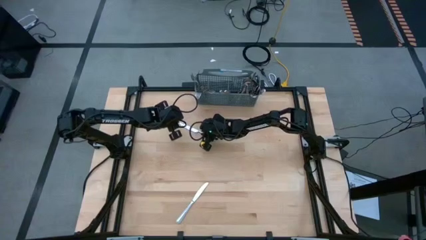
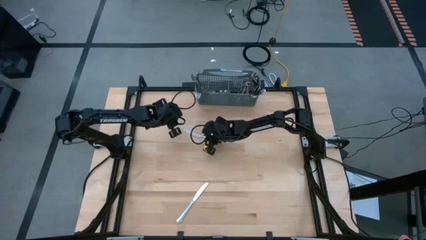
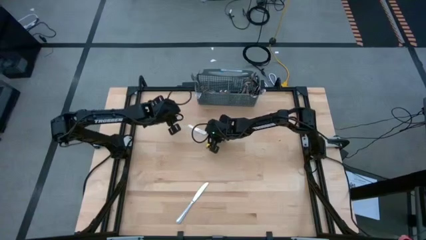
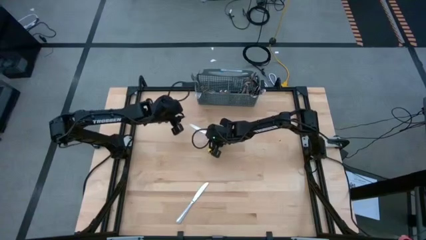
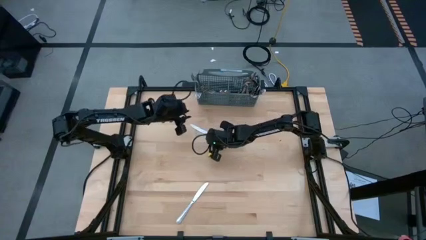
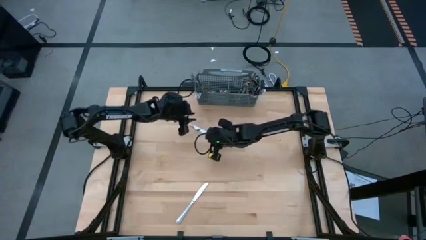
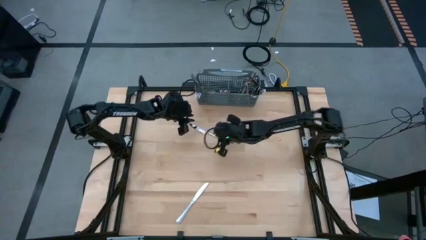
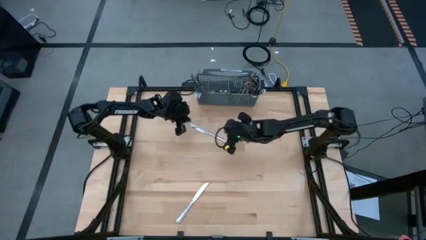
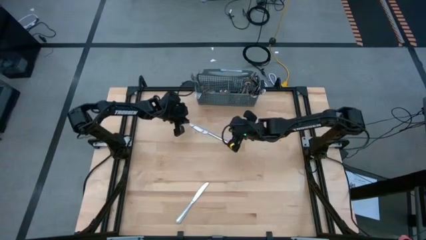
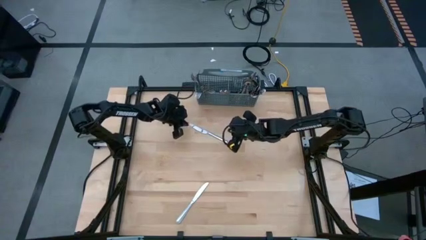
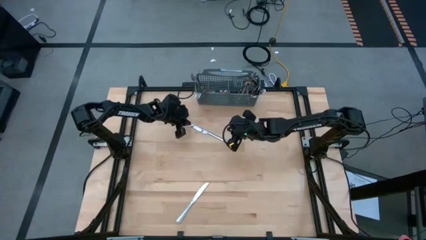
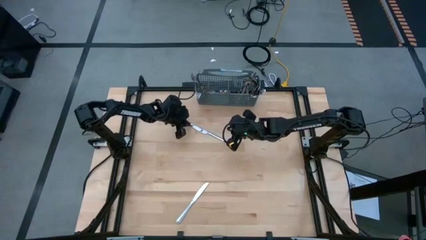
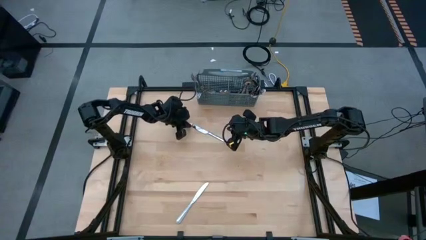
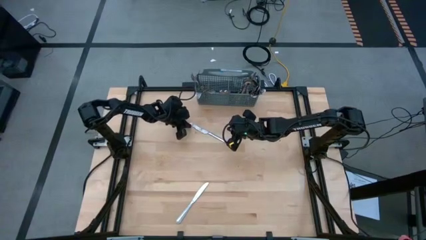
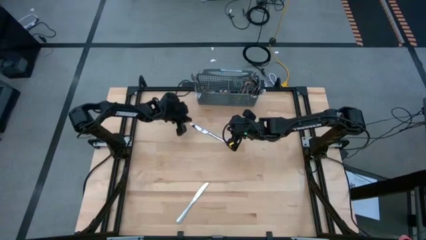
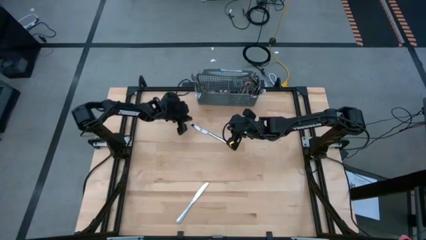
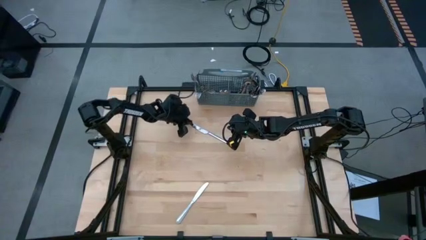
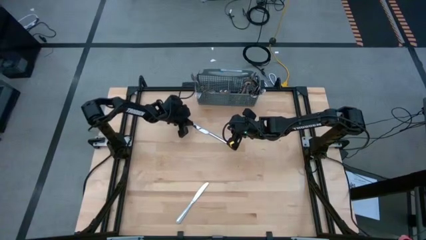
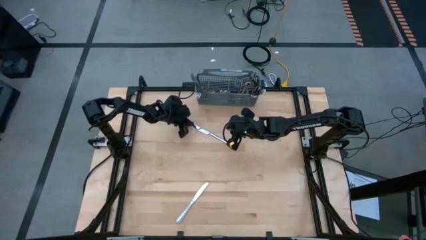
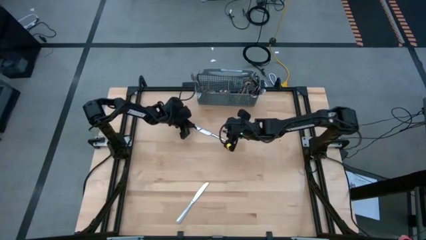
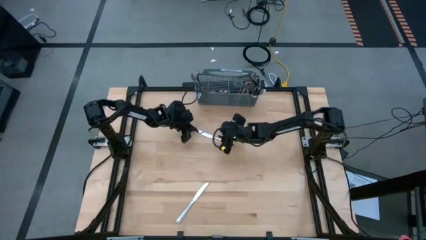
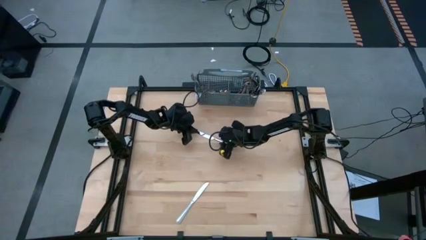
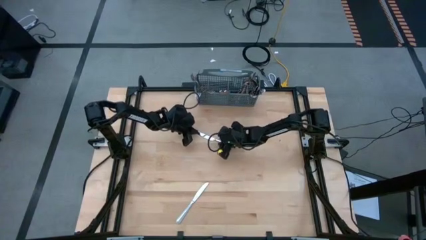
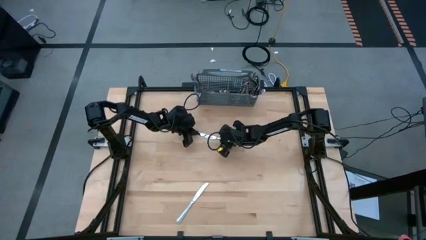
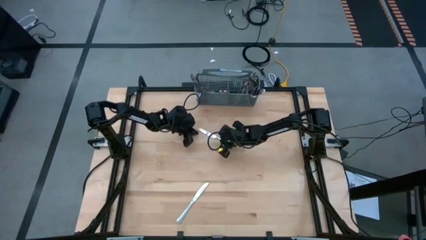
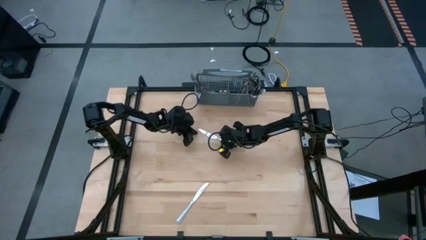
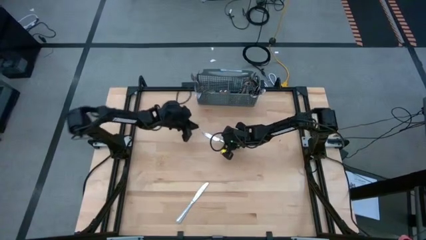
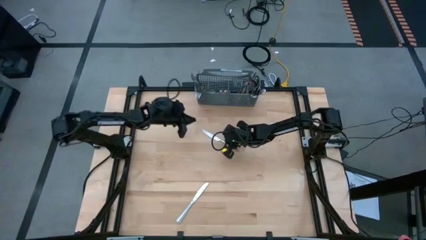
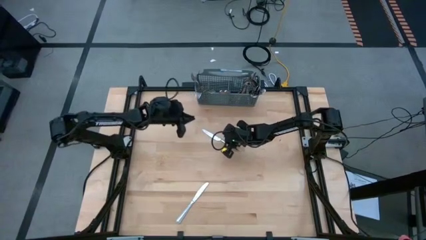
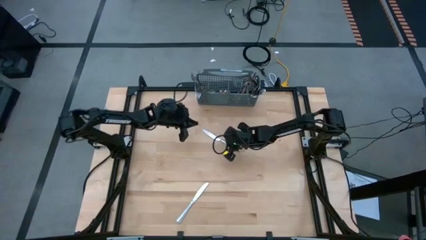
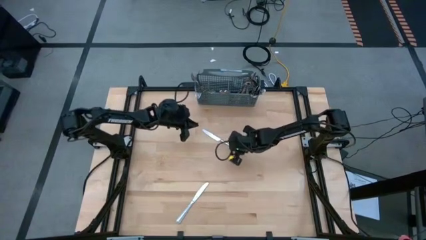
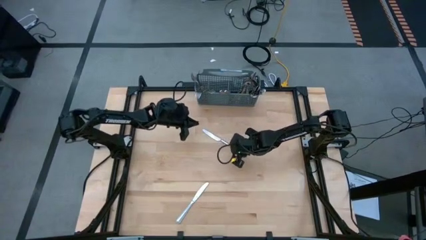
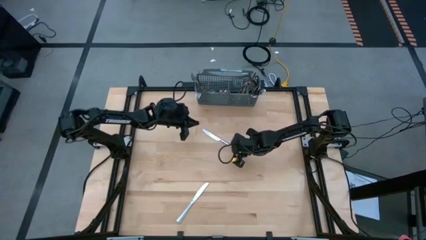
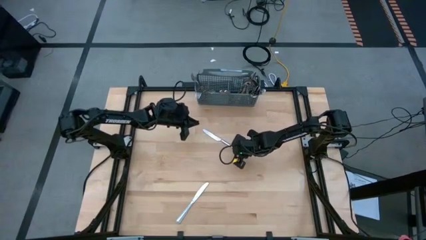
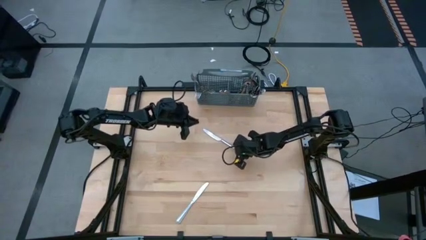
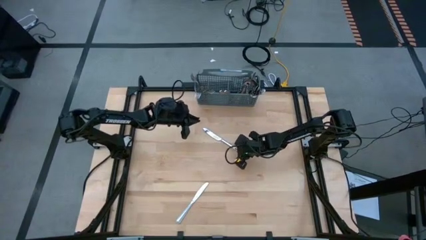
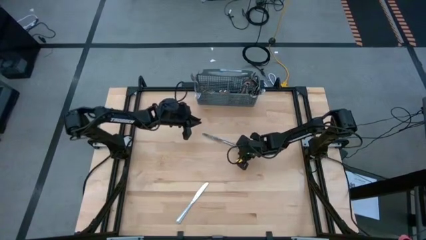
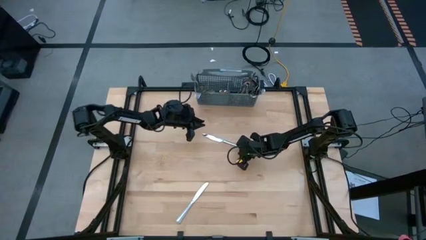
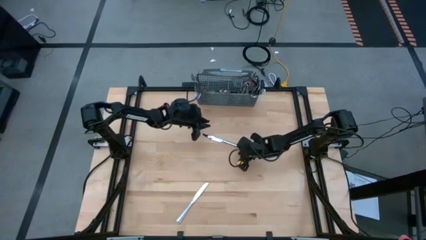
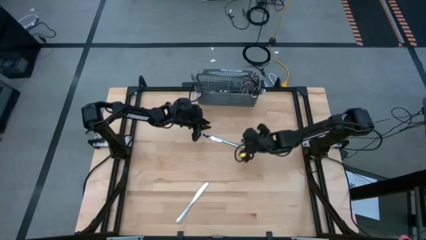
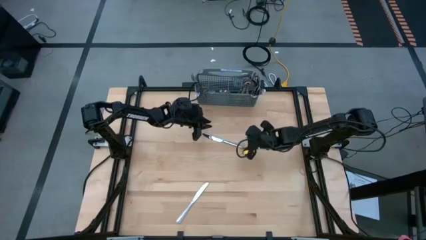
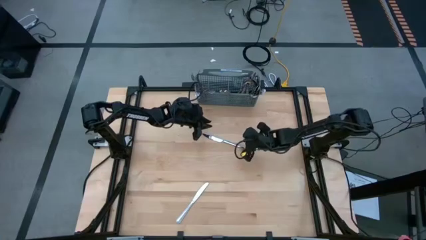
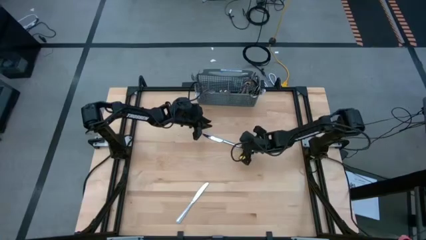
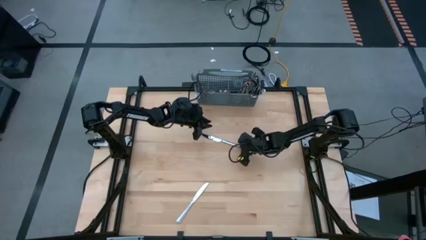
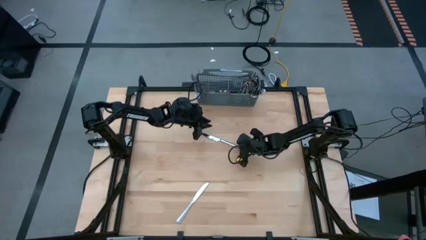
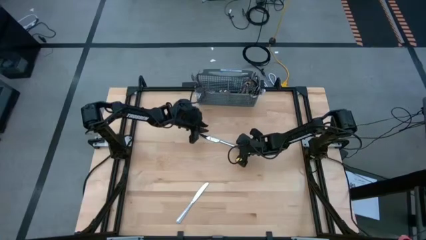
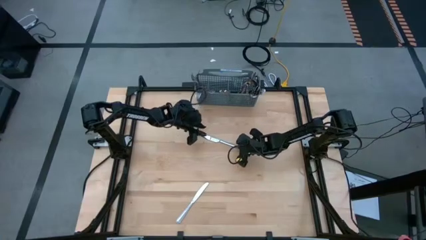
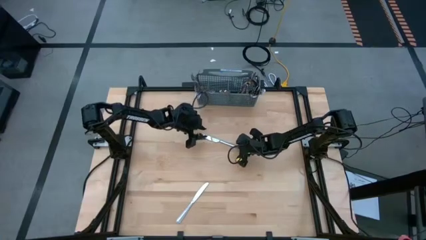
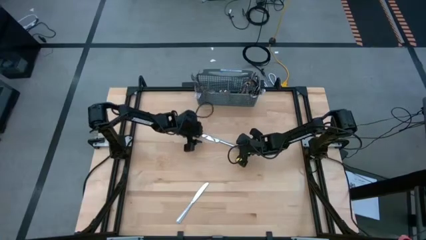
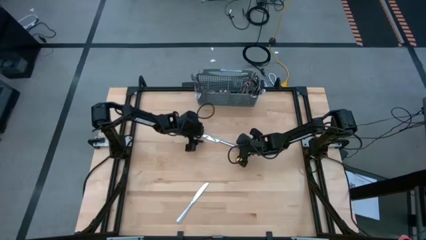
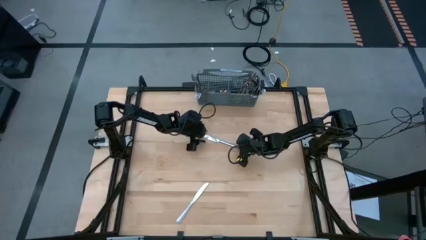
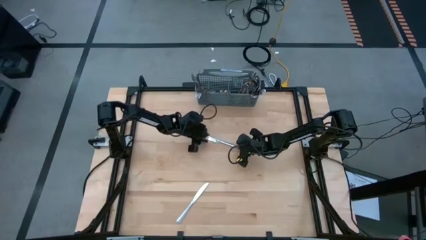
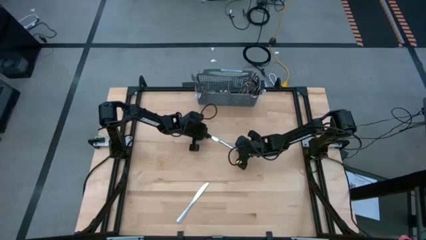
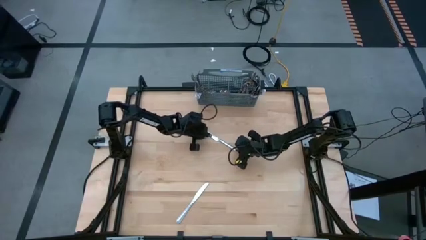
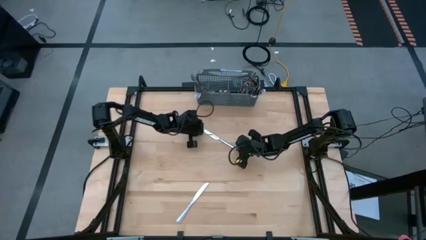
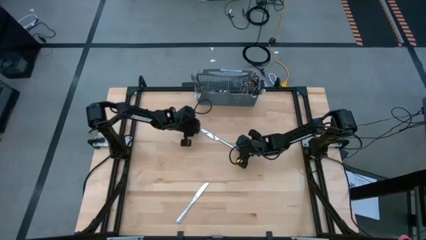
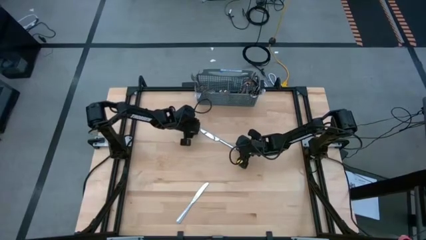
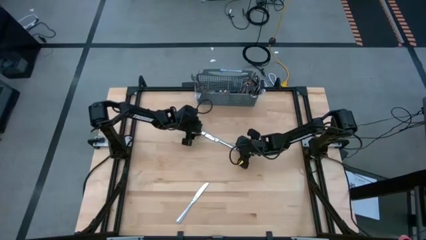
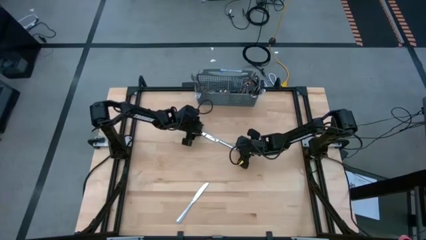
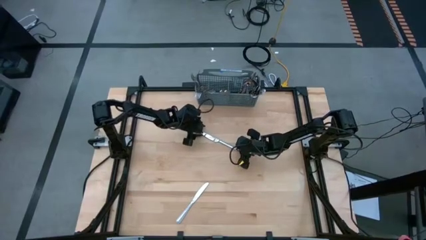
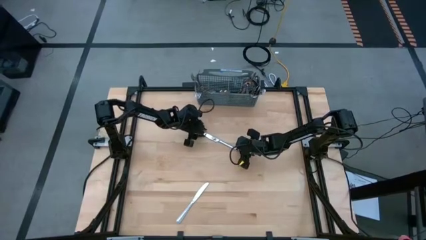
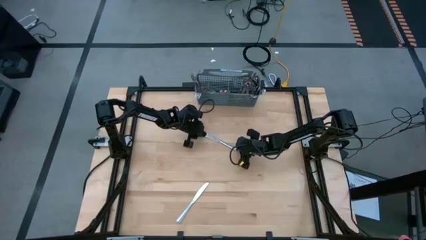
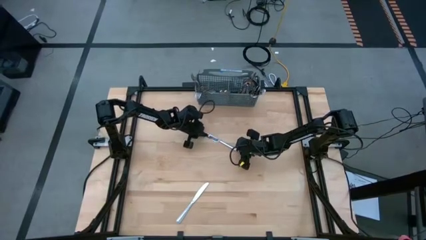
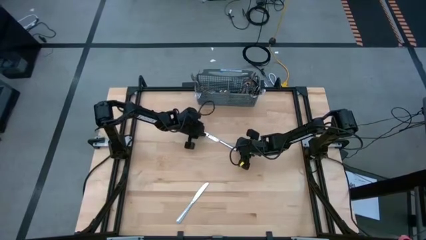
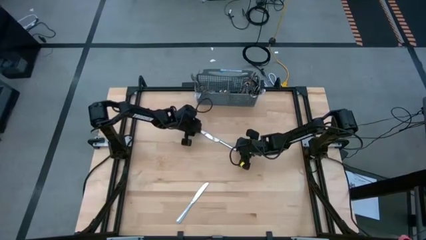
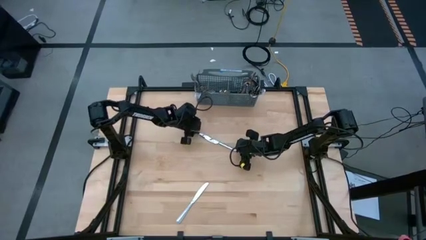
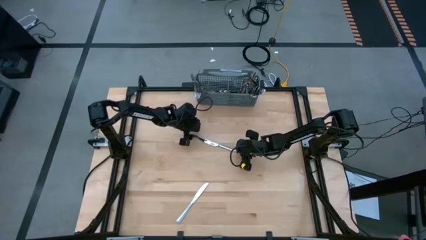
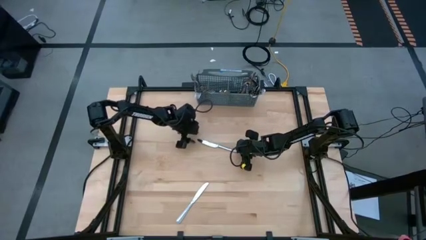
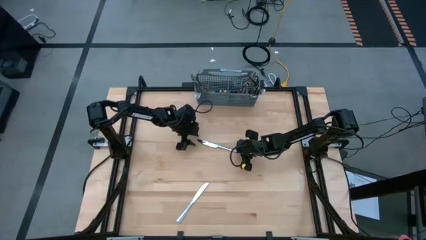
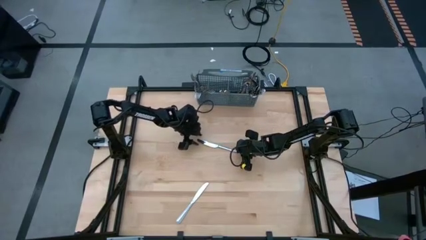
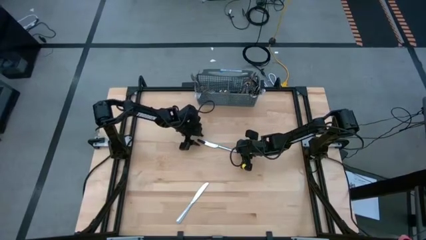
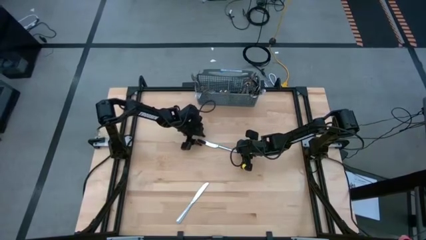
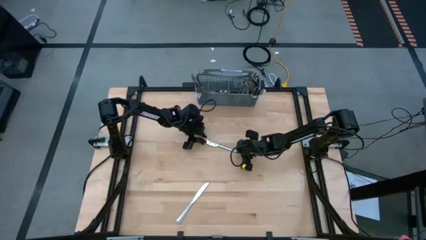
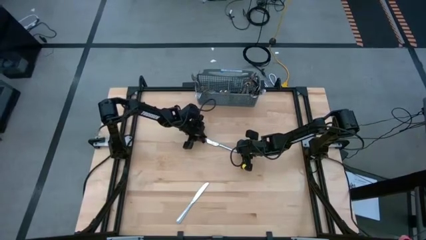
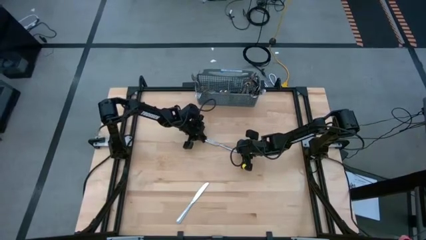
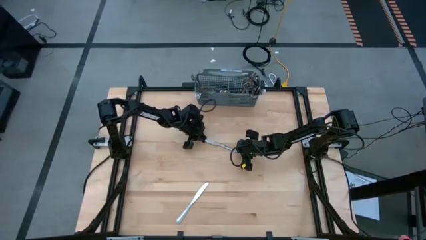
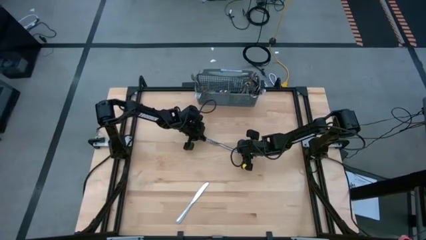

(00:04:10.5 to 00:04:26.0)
Task: Sort silverware
Put the silver table knife into the silverware organizer

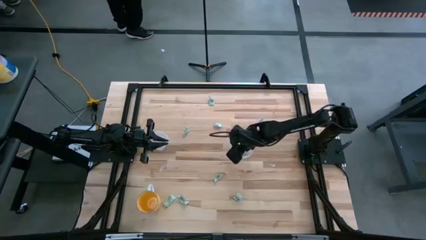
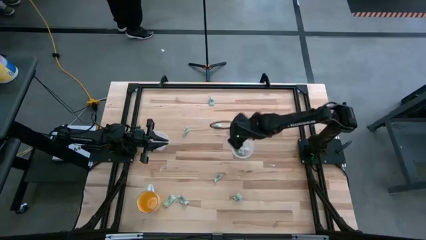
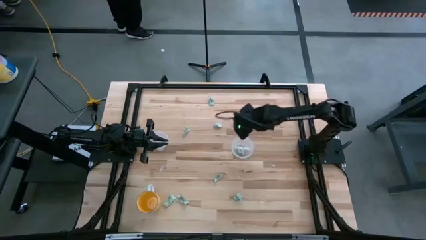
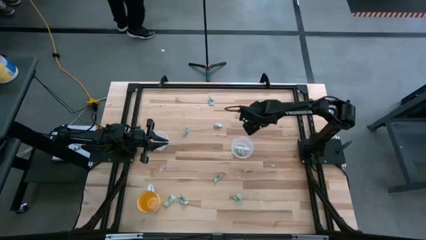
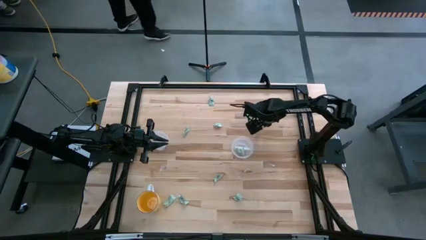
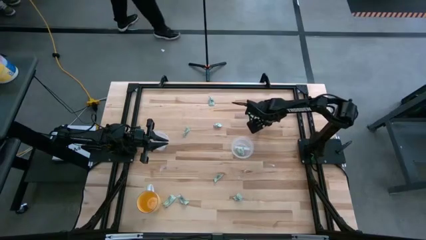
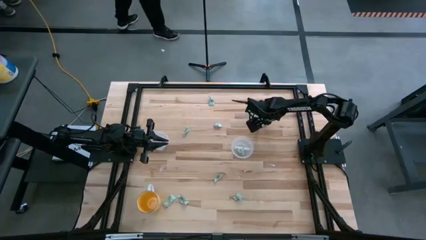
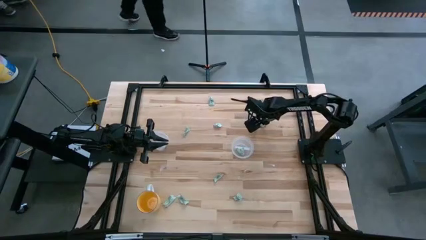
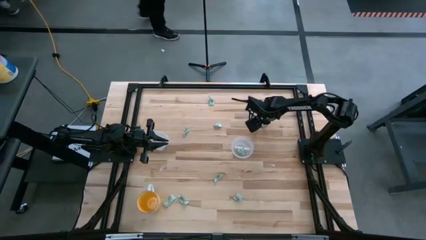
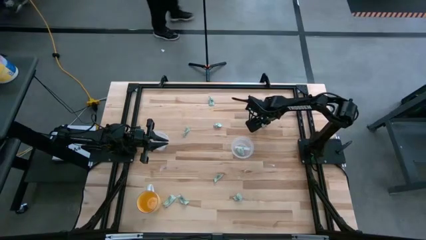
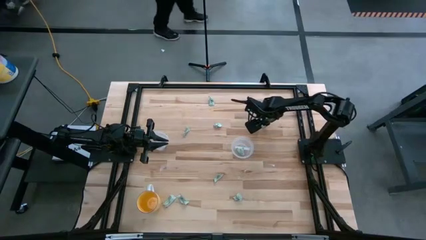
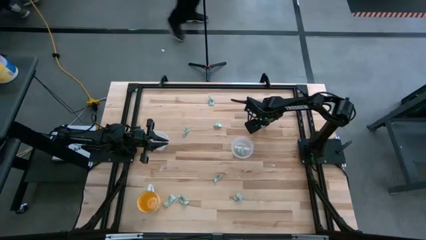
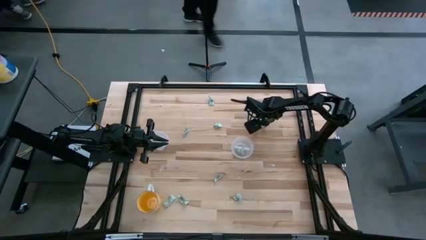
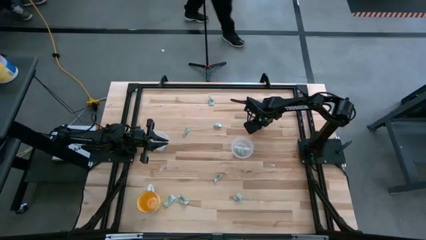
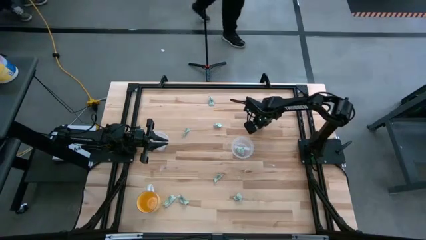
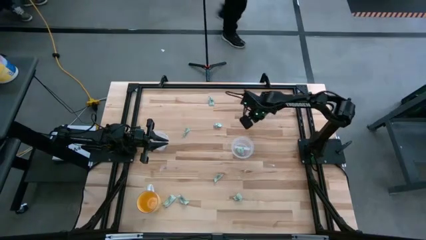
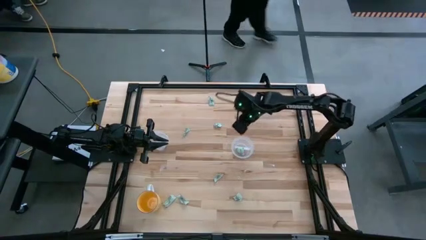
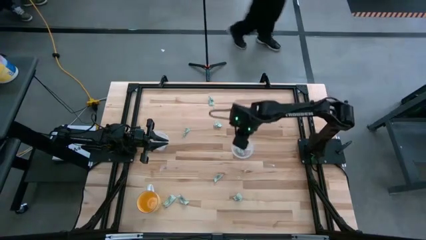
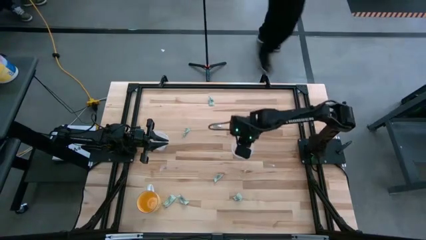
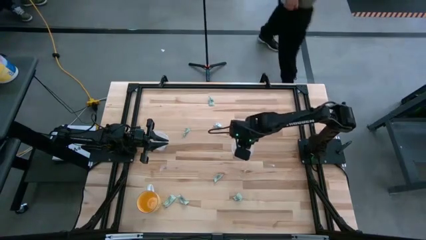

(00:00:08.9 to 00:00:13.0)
Task: Pick and place items into bin
Put the stevia pack into the right transparent bin
